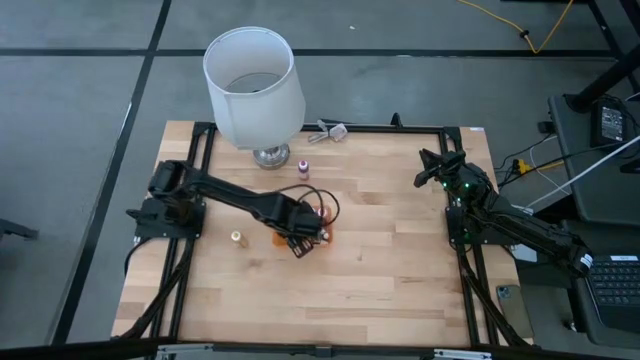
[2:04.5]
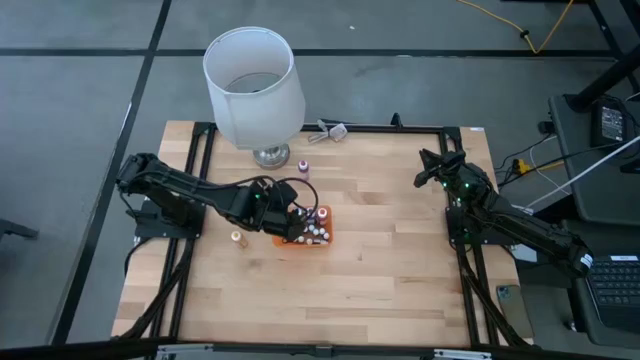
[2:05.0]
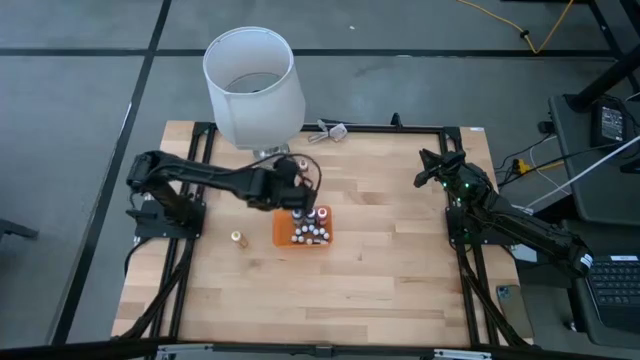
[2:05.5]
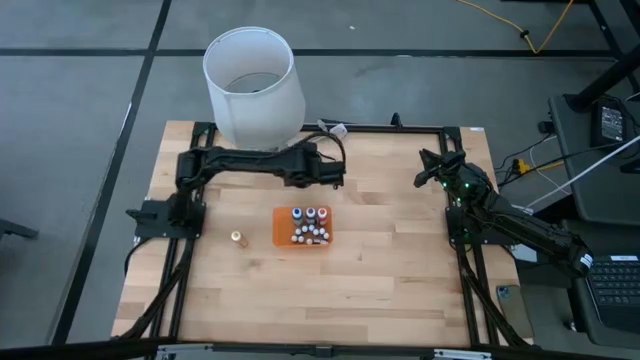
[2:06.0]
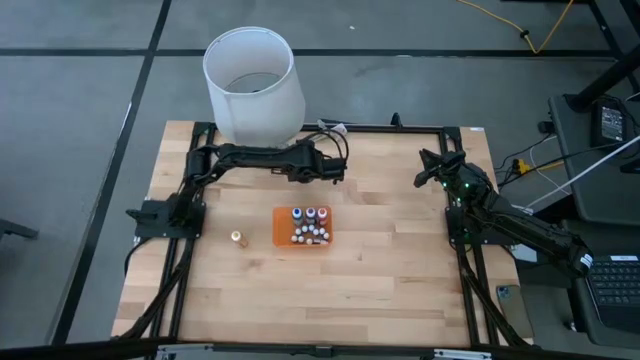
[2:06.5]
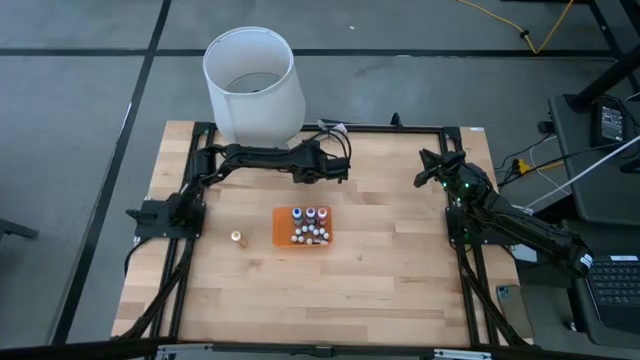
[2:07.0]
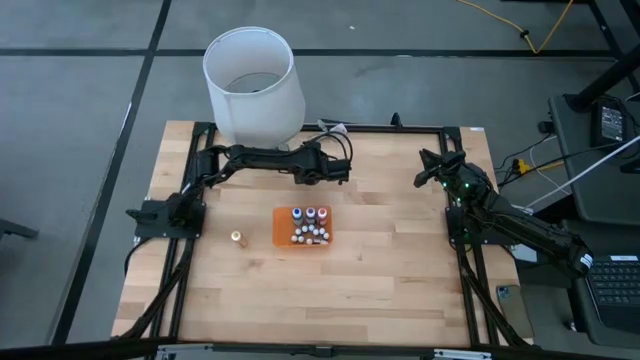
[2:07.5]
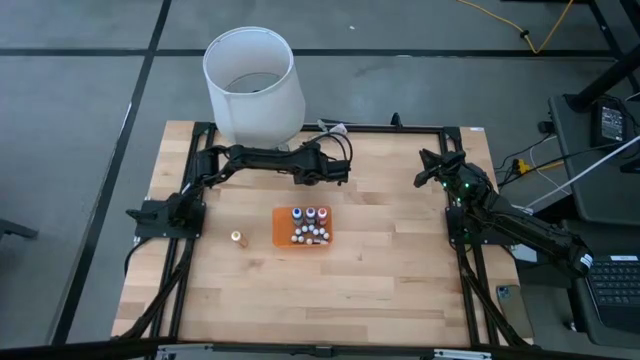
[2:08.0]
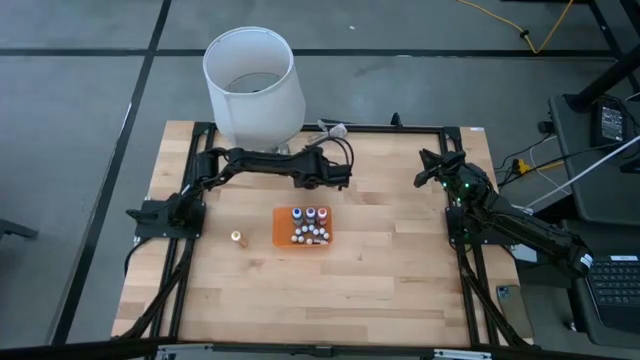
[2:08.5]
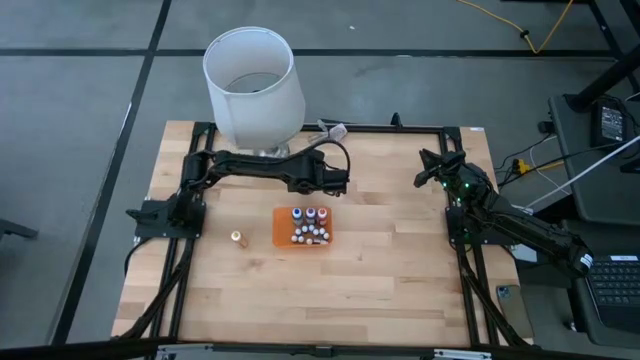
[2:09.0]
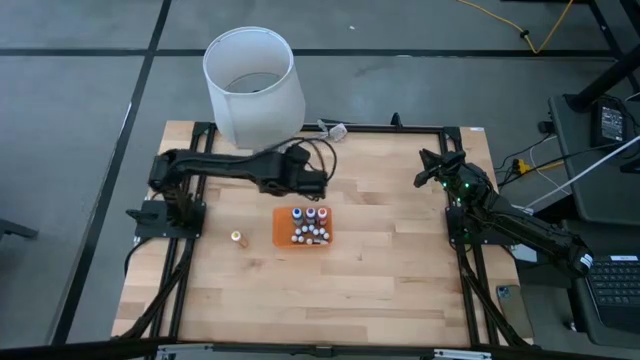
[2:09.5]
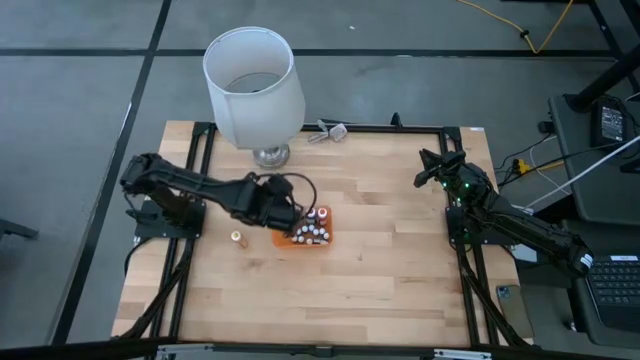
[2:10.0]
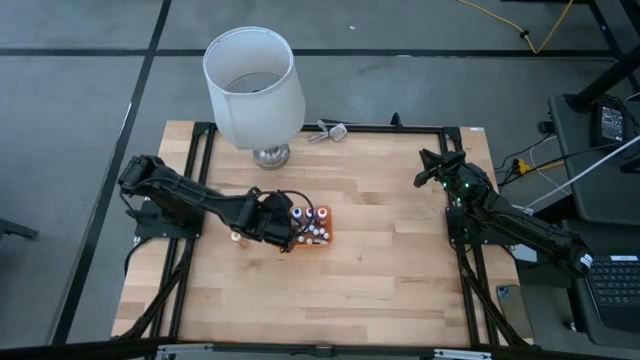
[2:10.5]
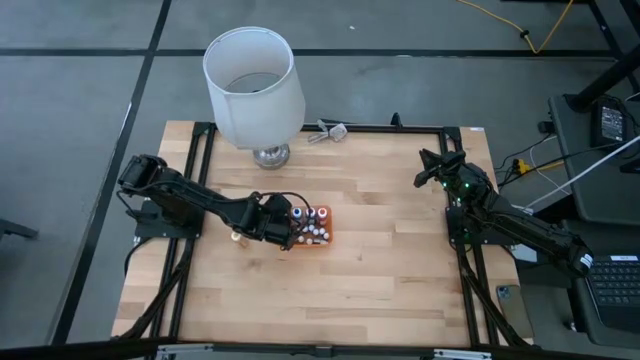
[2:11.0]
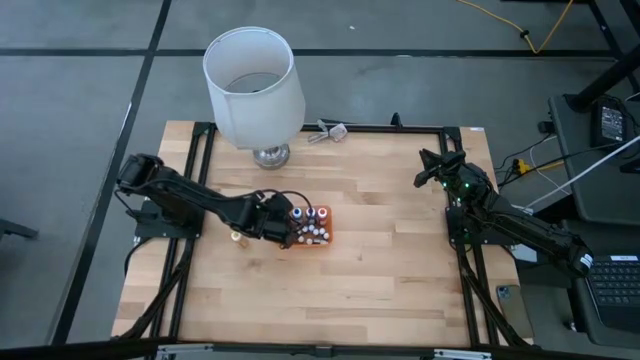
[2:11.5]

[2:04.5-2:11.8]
Task: Pick & Place food coloring
Put the big pink food coloring bottle into the orange bin

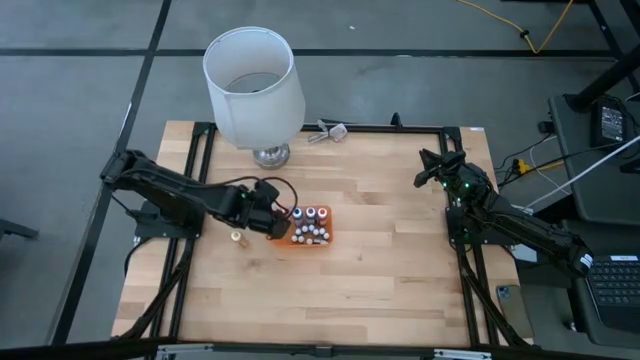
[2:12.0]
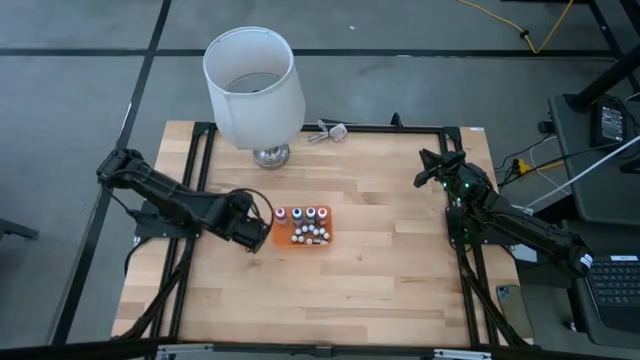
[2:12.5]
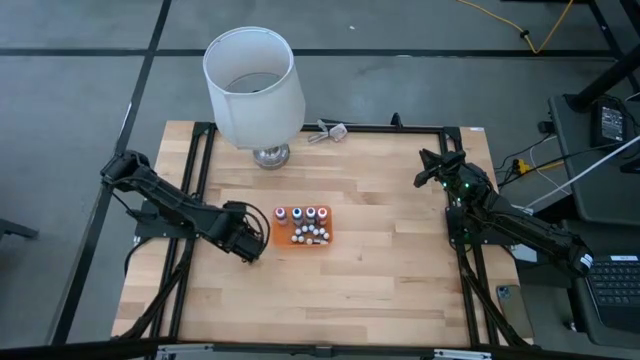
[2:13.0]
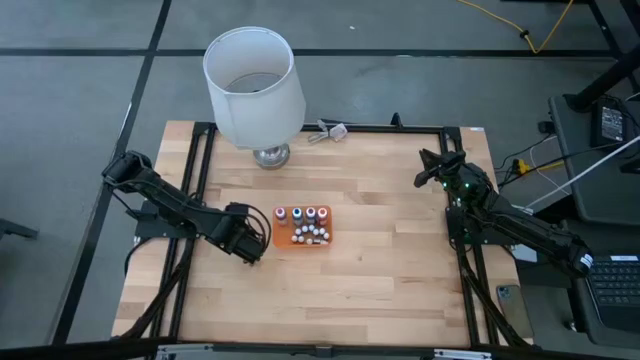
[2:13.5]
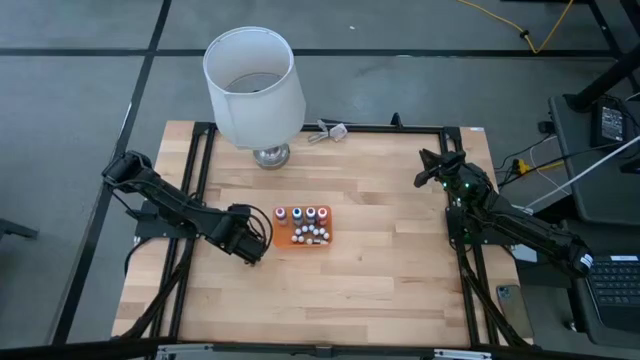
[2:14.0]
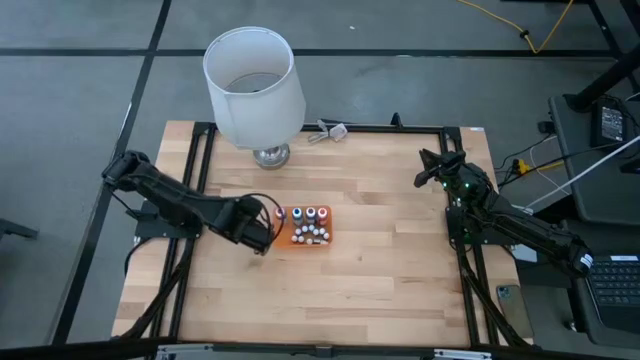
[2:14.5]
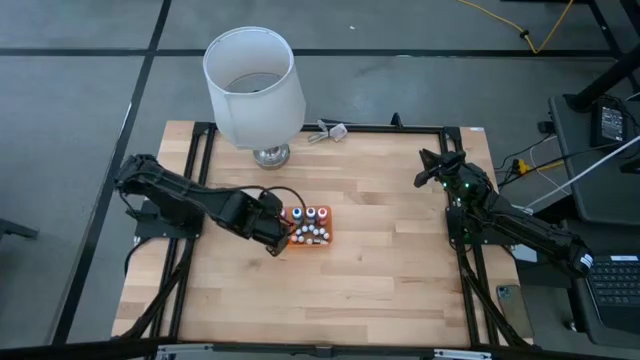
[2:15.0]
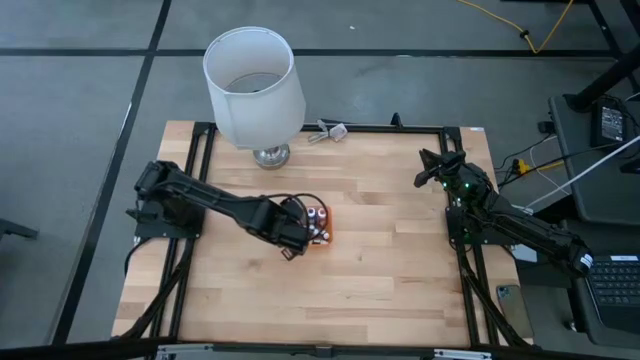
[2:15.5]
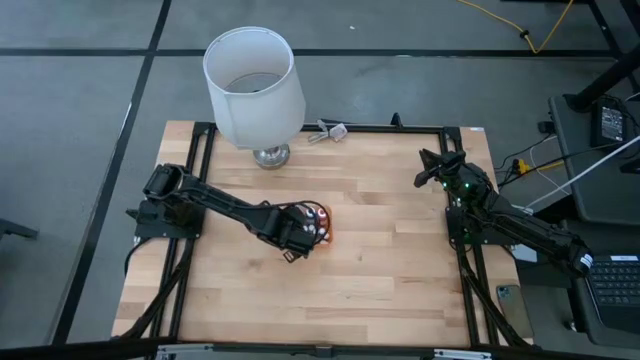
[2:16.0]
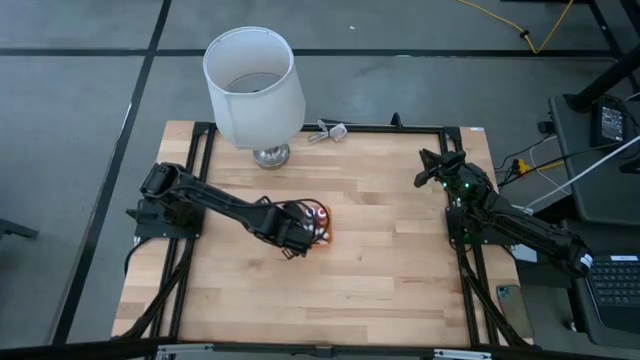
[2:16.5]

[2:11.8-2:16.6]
Put the big yellow food coloring bottle into the orange bin

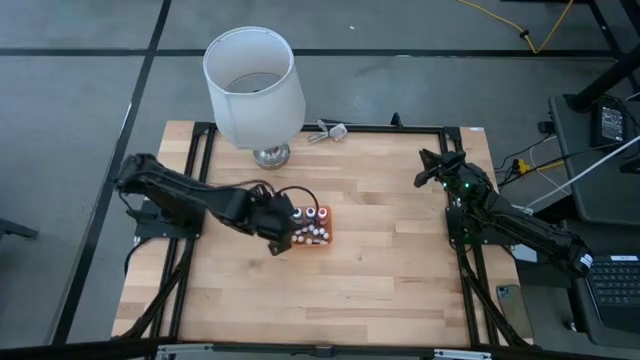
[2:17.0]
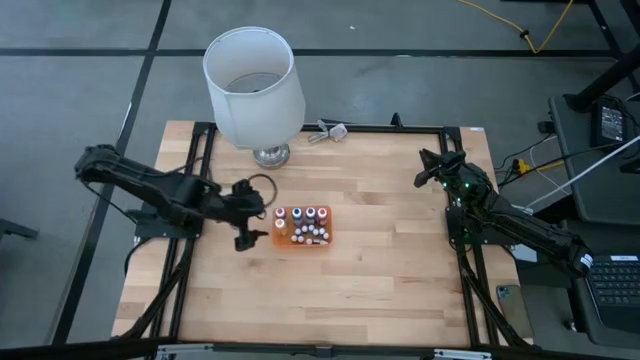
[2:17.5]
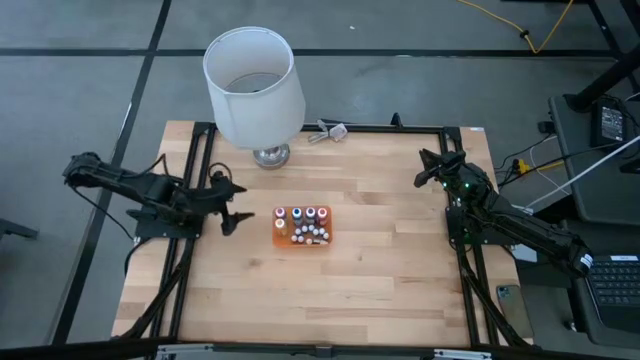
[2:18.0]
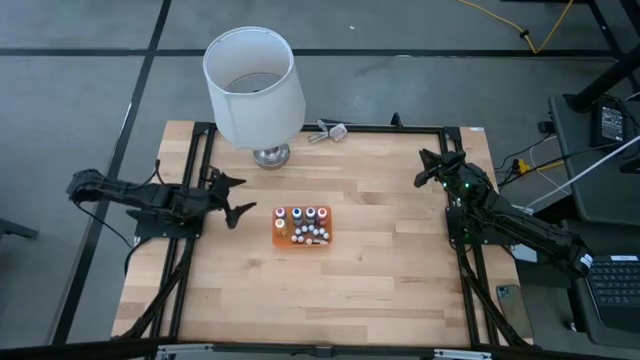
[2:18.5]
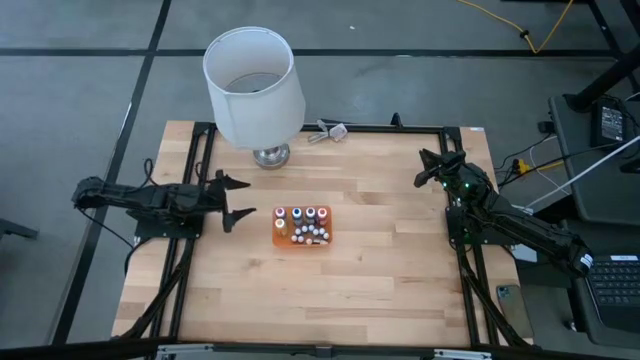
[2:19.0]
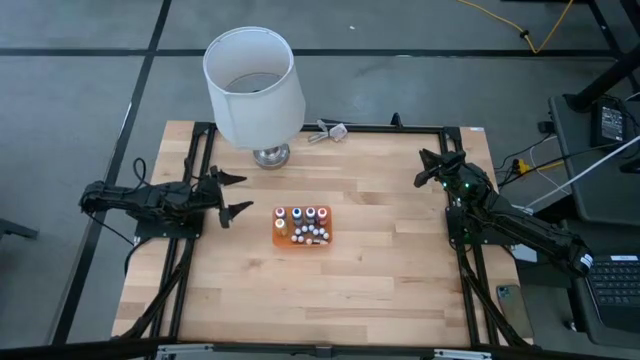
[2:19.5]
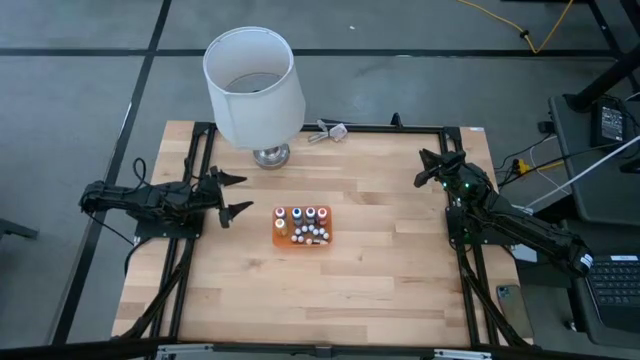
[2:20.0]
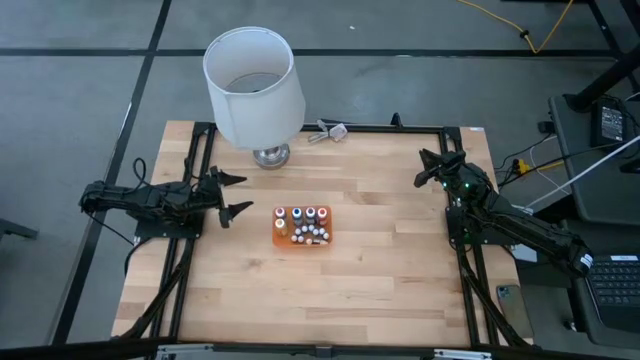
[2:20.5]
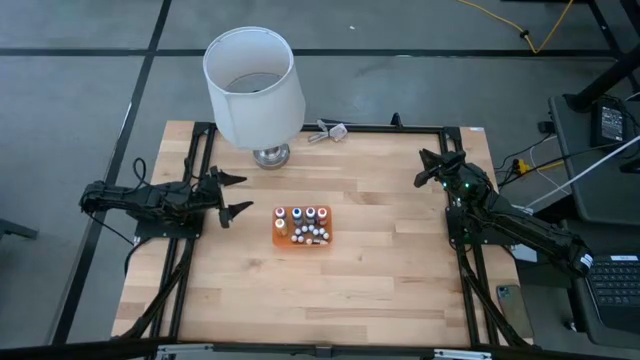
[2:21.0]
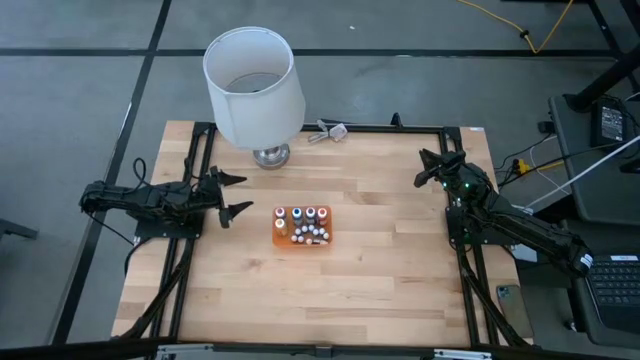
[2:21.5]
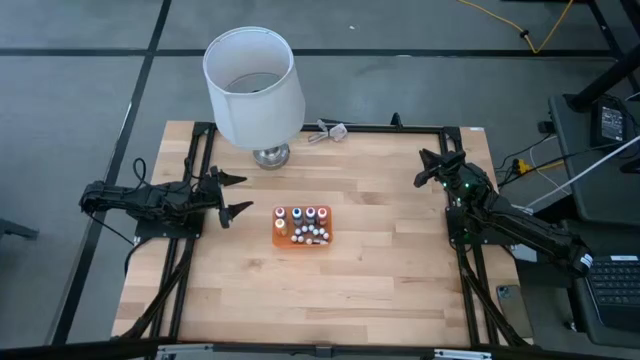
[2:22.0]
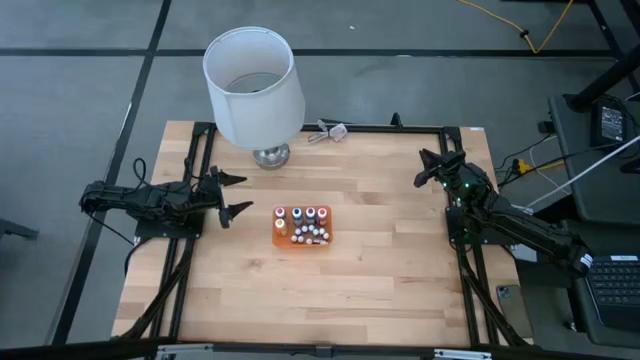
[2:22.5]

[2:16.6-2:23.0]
Return to Home Position

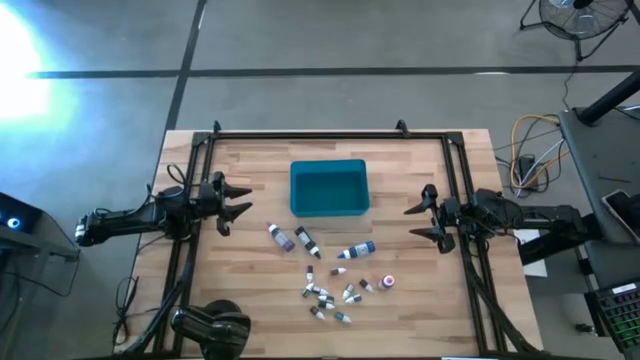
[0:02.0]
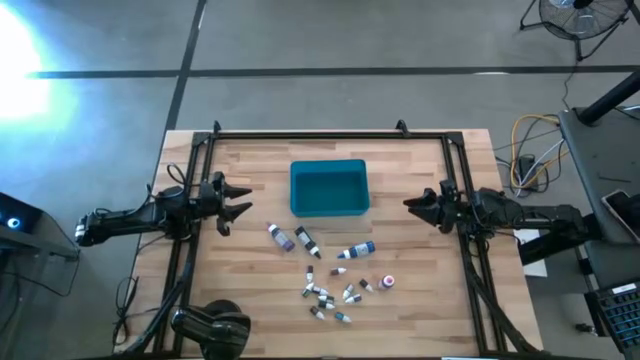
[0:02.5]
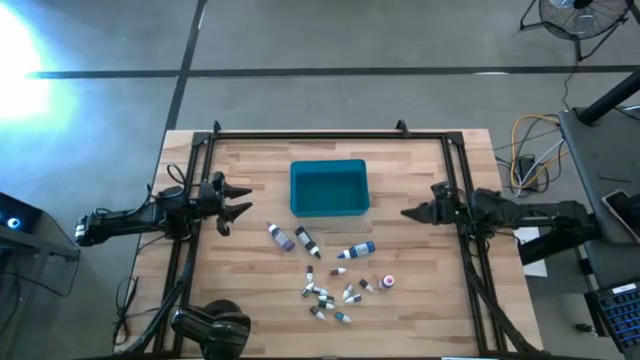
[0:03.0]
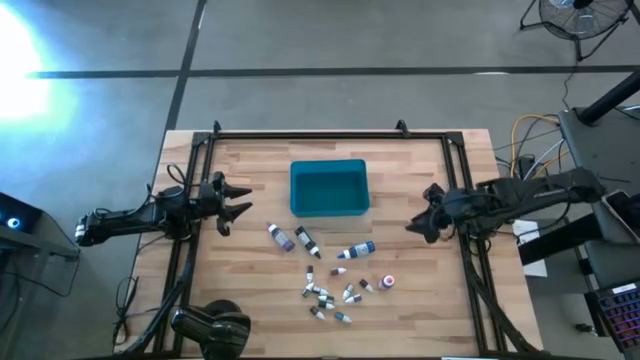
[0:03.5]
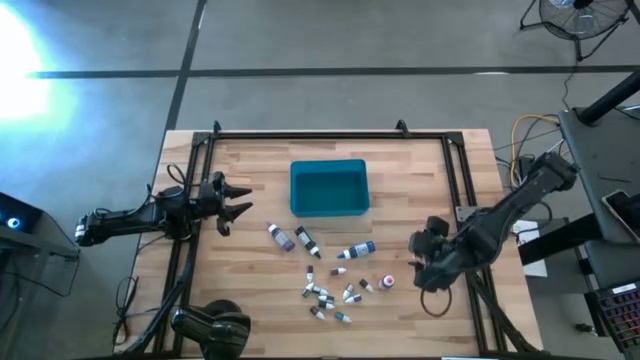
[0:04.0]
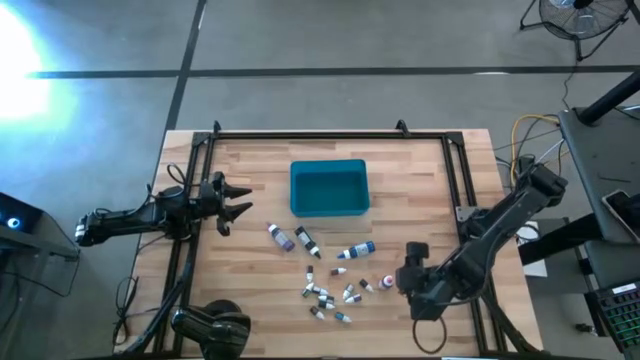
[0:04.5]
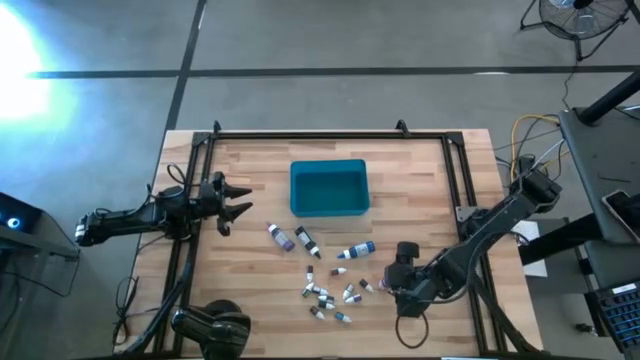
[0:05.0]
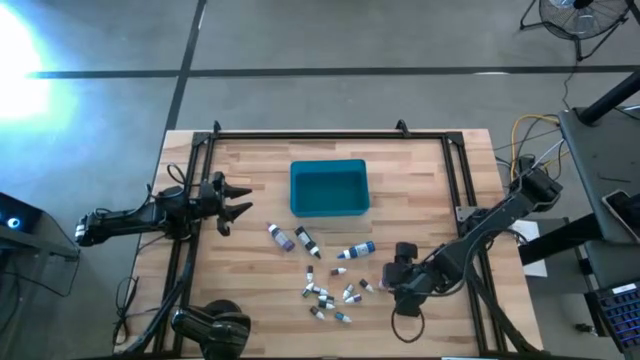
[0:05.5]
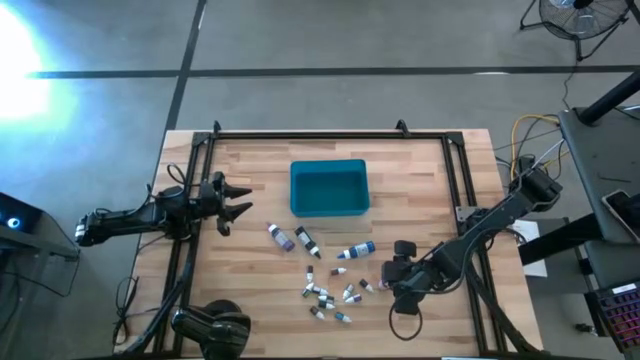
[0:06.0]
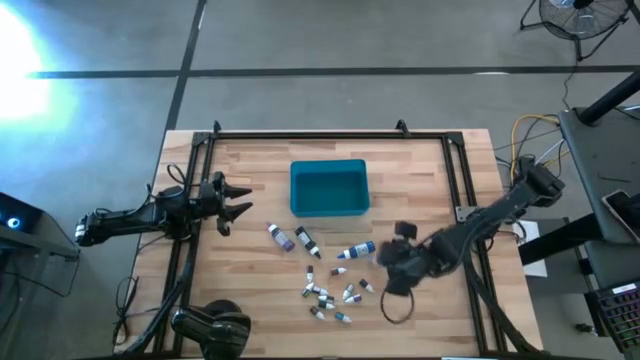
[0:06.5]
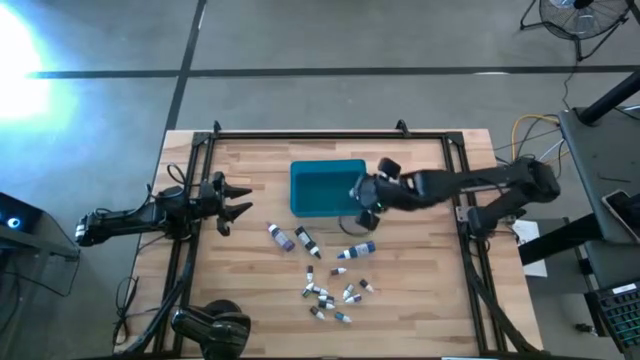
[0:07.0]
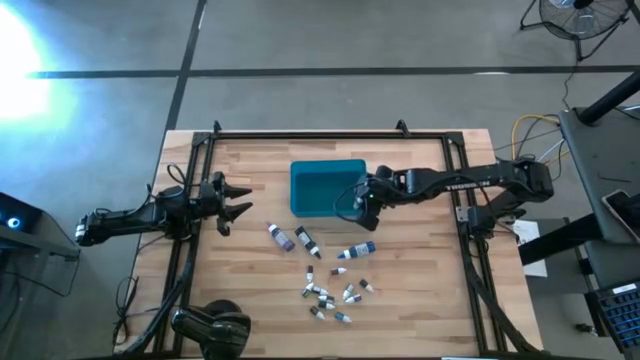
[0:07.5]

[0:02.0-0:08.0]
Task: Pick & Place food coloring
Put the pink food coloring bottle into the blue bin
